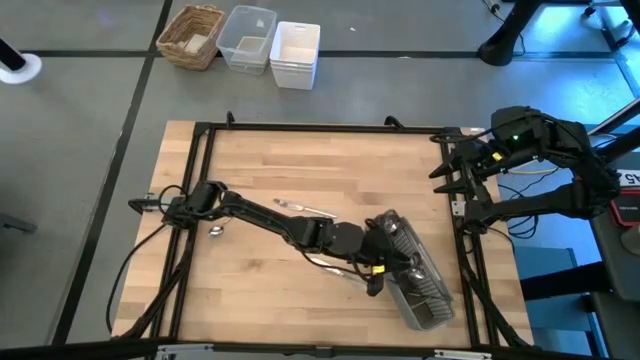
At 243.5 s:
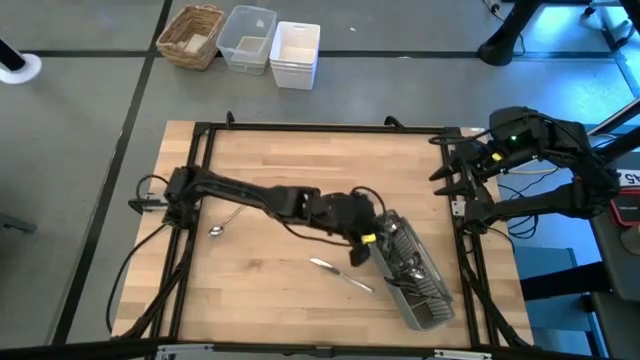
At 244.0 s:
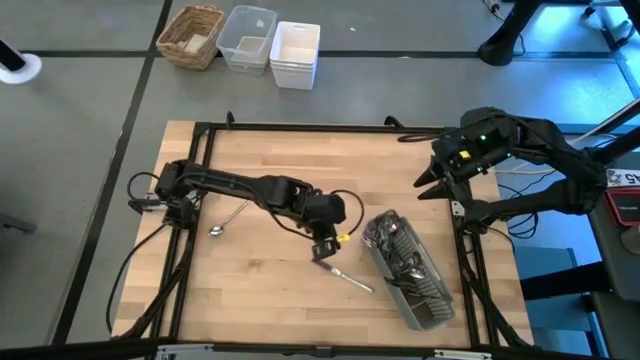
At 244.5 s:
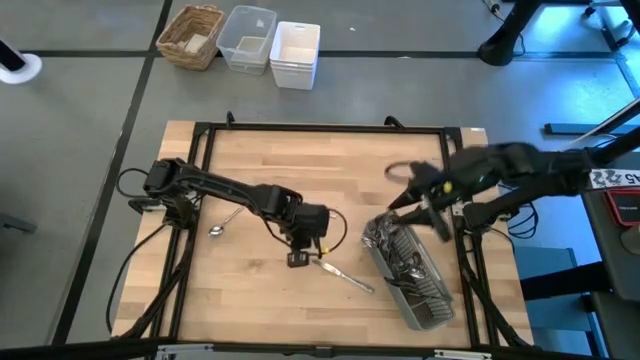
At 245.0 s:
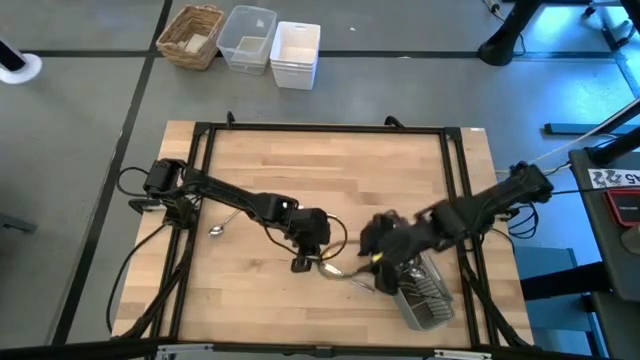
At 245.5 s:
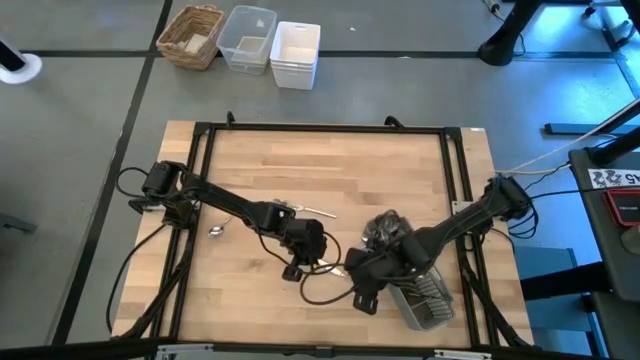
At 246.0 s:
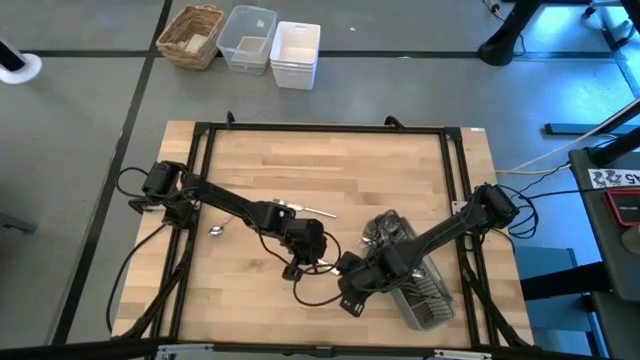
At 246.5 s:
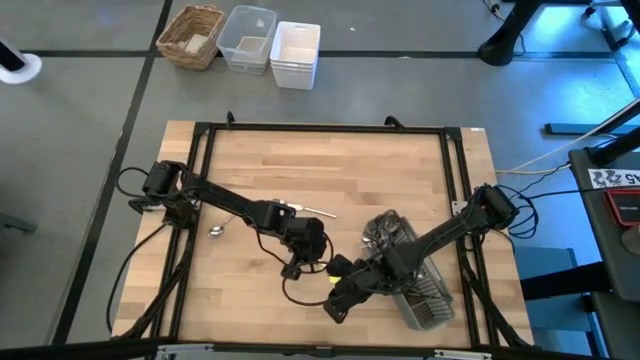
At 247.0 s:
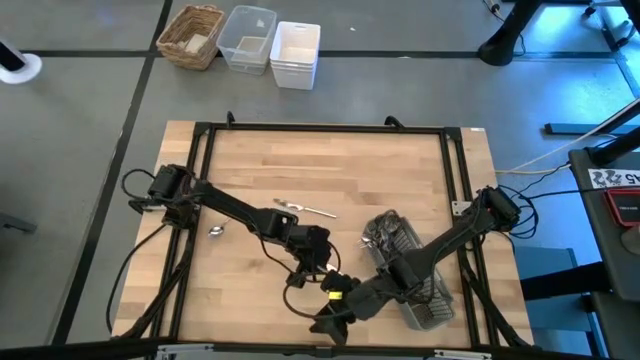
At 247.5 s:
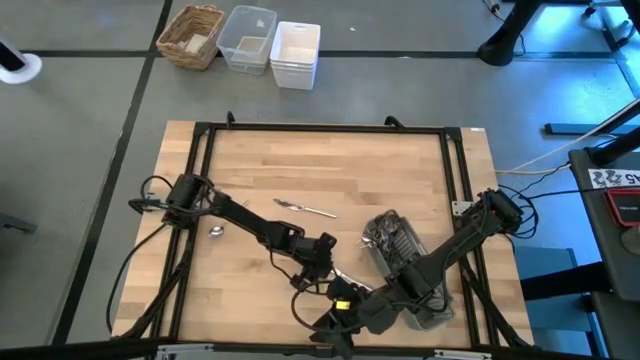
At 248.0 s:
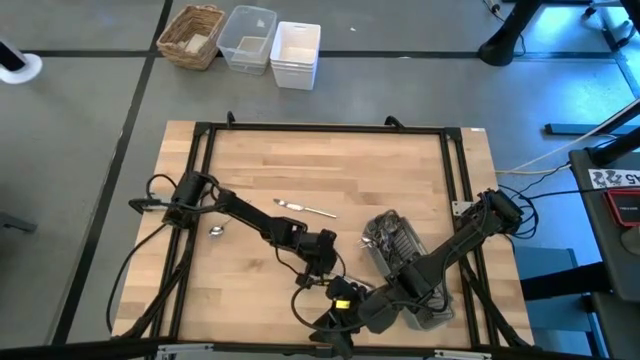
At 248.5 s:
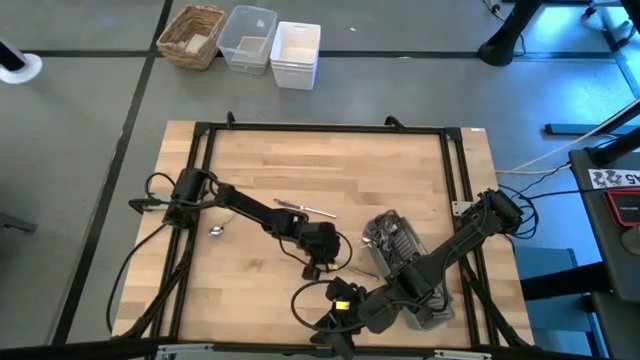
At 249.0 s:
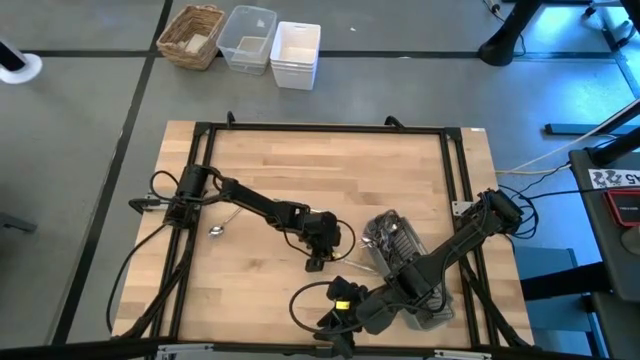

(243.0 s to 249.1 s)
Task: Sort silverware
Put the silver table knife into the gray silverware basket

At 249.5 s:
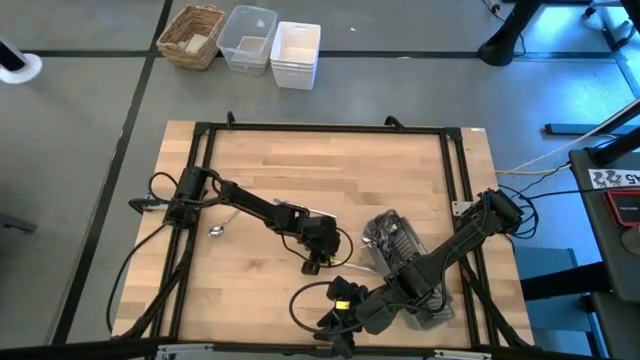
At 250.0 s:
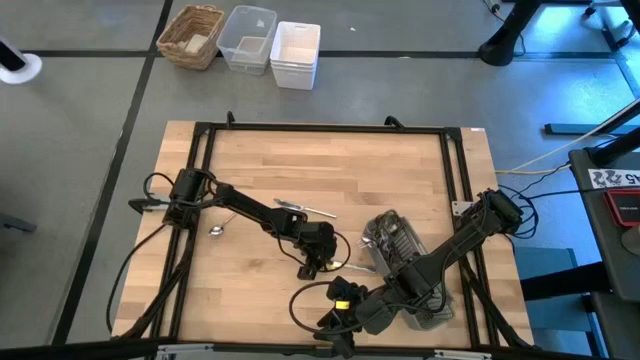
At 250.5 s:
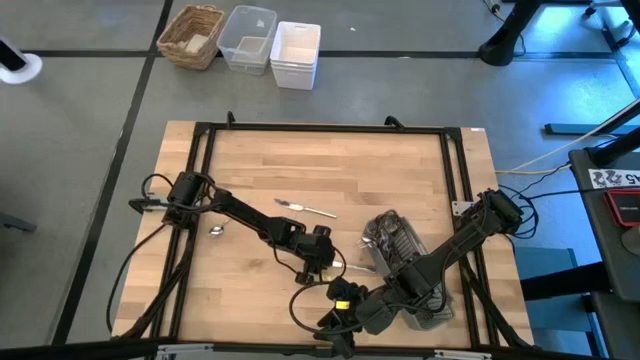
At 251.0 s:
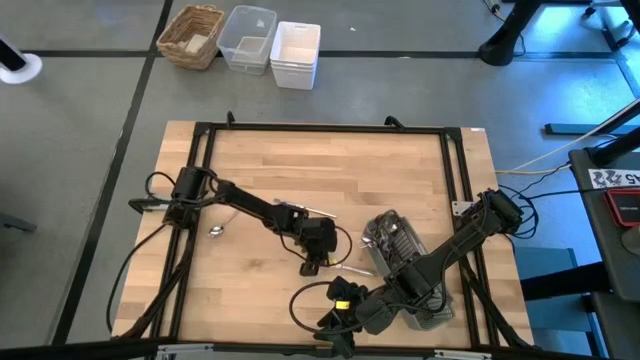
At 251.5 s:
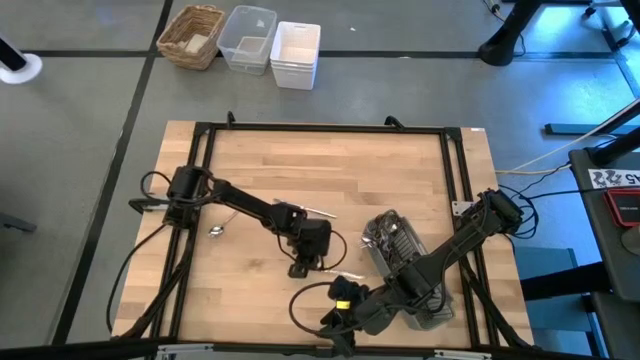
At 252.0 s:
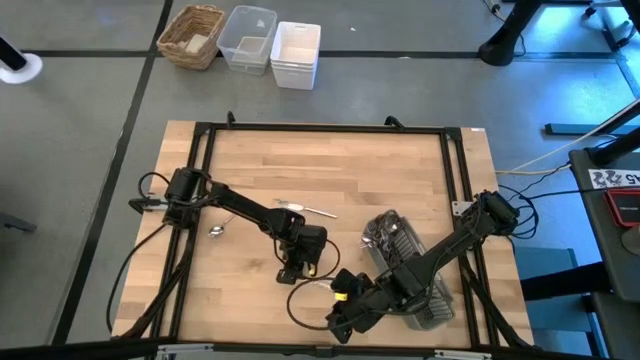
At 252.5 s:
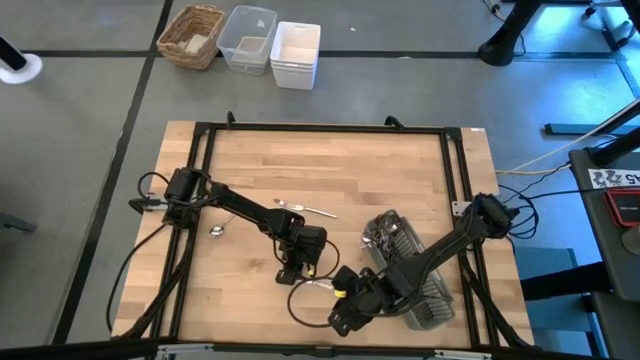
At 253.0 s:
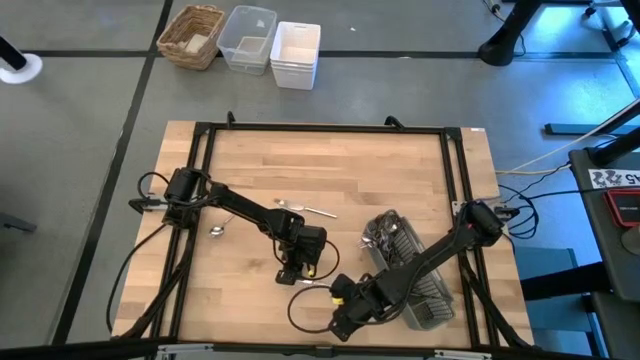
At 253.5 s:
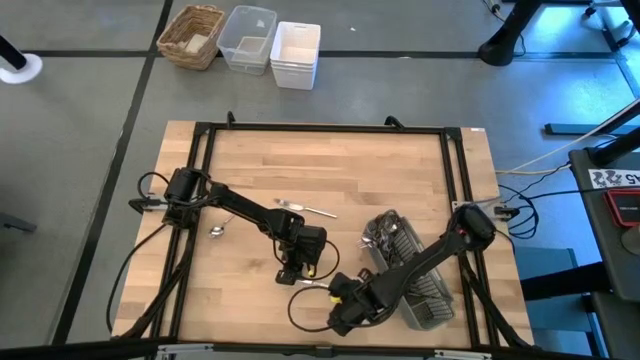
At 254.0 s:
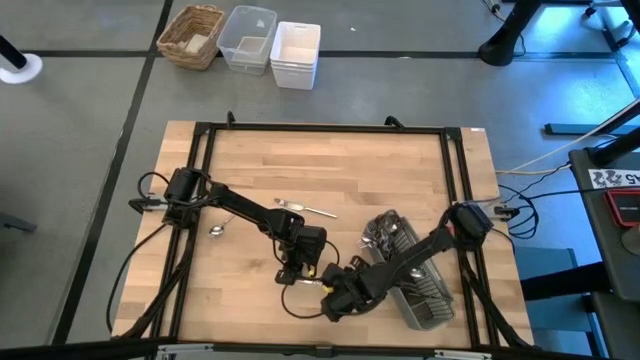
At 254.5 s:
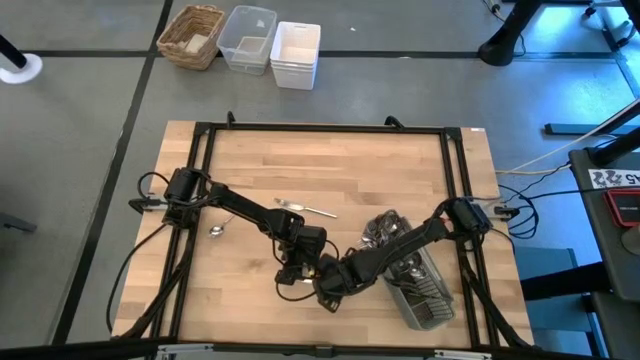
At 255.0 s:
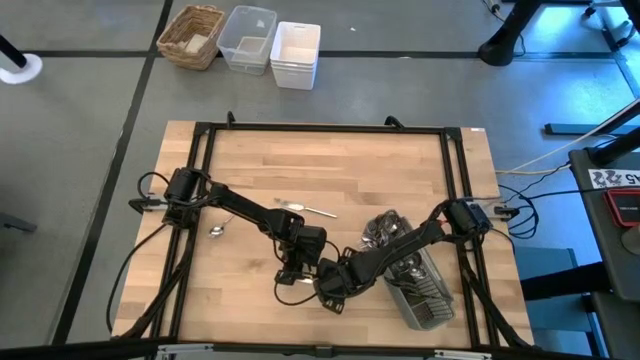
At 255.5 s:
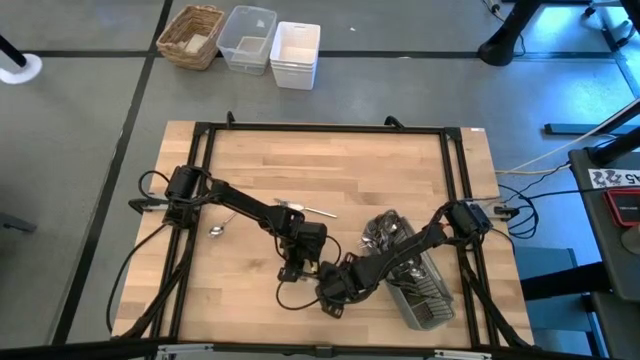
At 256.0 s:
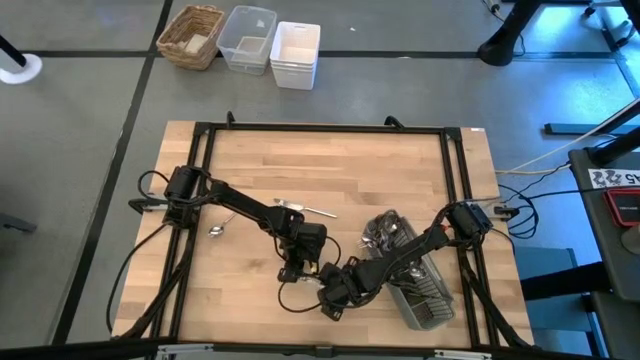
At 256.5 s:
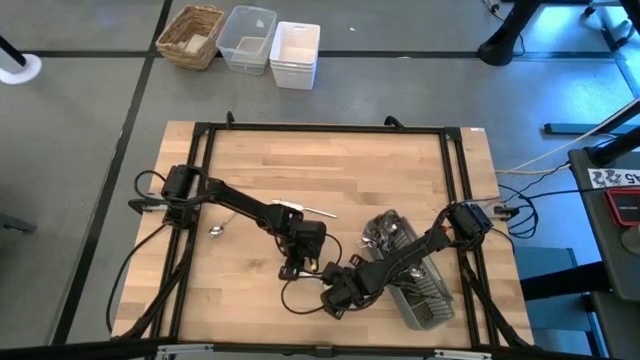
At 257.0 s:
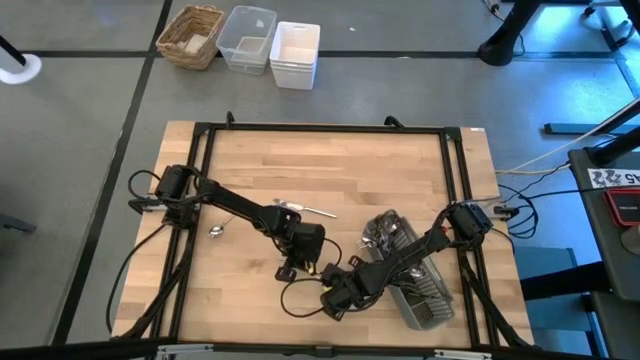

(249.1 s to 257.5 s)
Put the silver table knife into the gray silverware basket

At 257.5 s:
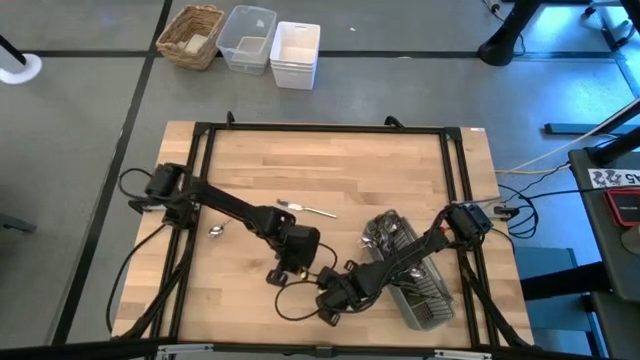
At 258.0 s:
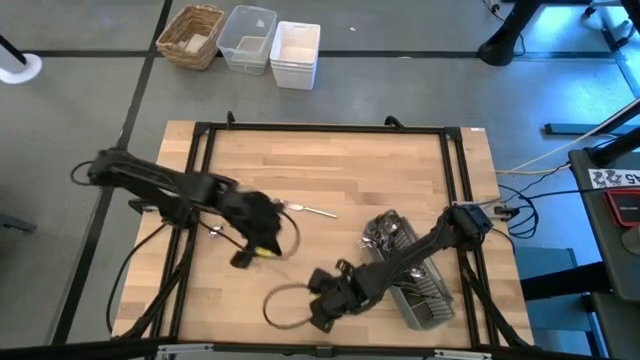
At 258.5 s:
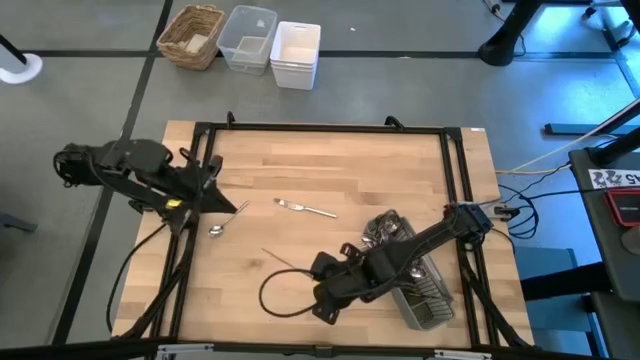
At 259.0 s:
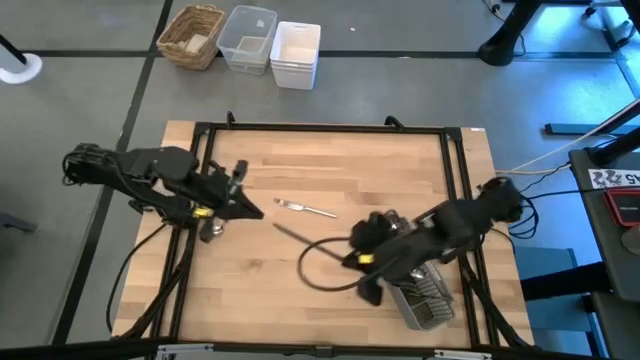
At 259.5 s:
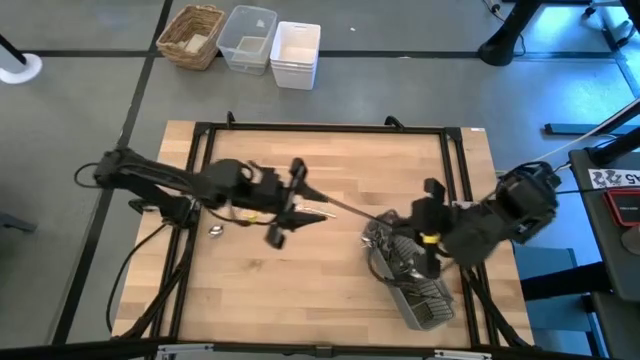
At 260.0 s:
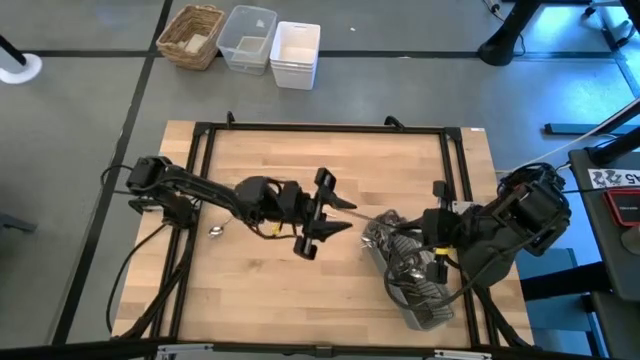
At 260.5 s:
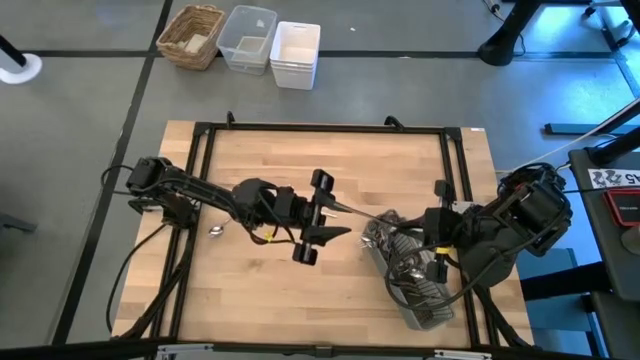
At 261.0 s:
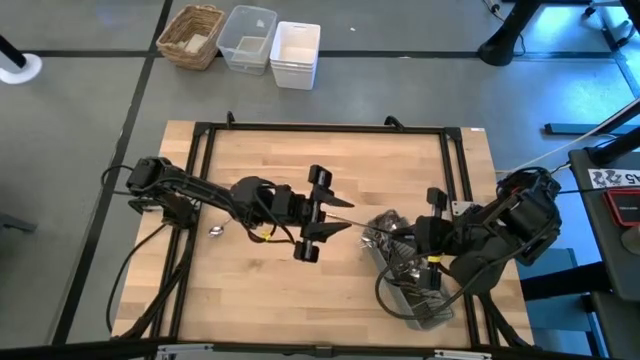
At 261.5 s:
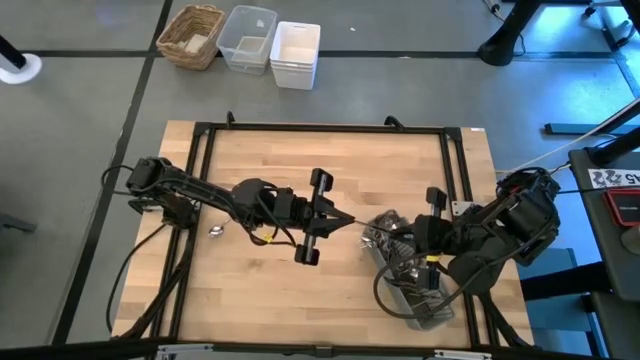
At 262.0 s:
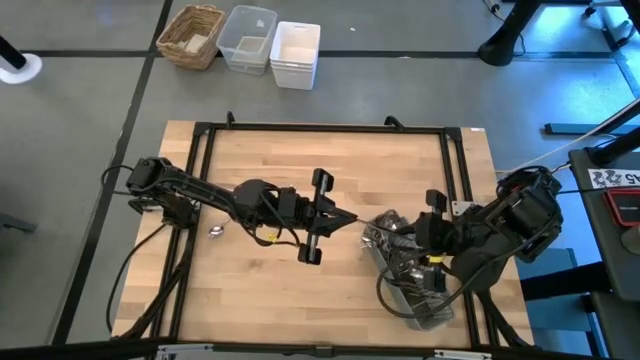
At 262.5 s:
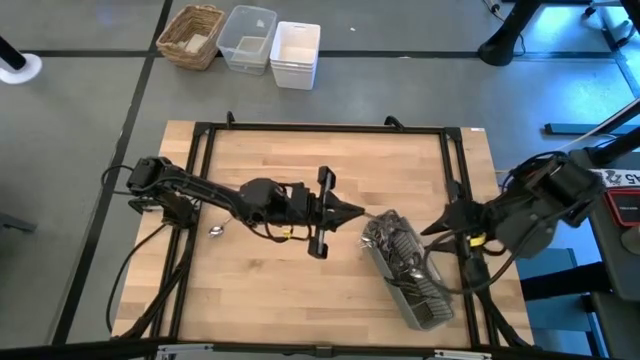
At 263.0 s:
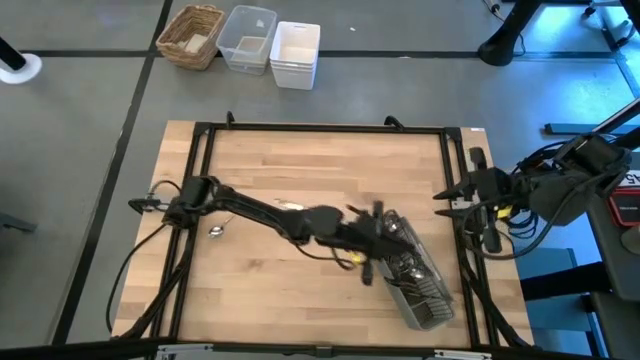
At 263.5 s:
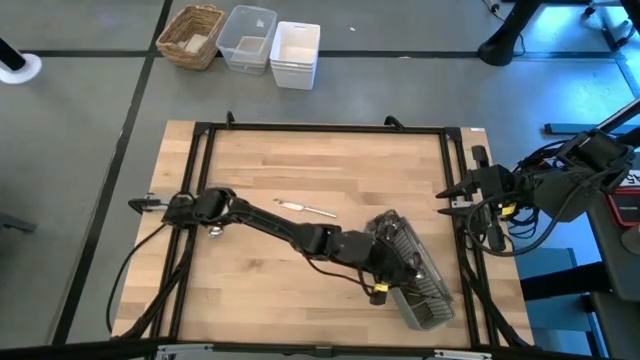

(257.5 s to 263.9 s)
Put the silver table knife into the gray dishwasher cutlery basket
